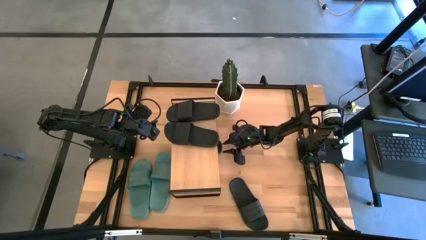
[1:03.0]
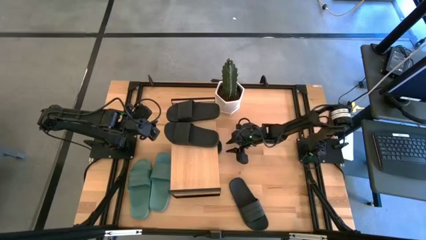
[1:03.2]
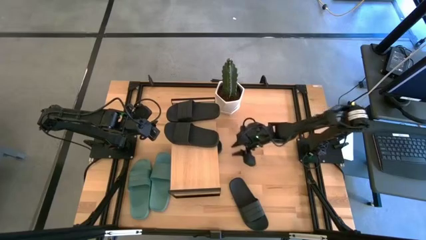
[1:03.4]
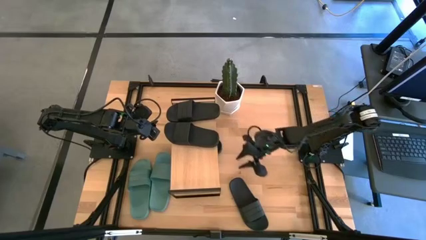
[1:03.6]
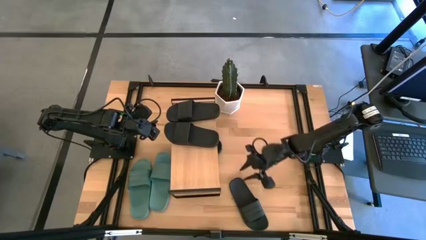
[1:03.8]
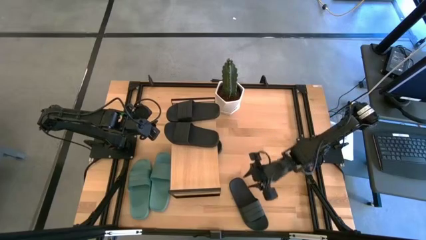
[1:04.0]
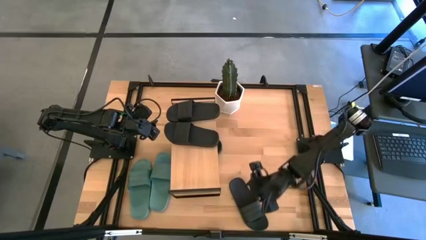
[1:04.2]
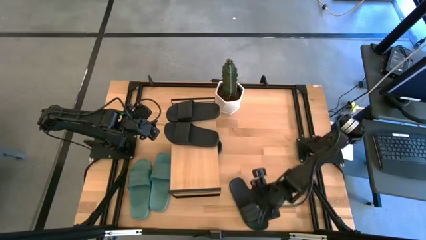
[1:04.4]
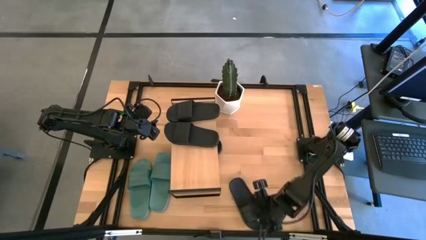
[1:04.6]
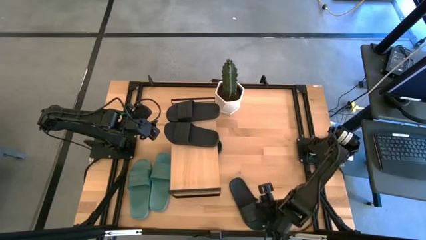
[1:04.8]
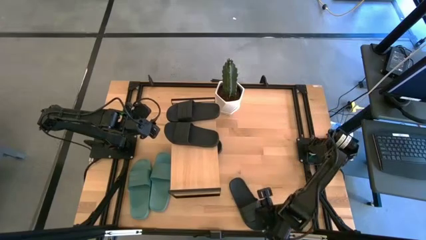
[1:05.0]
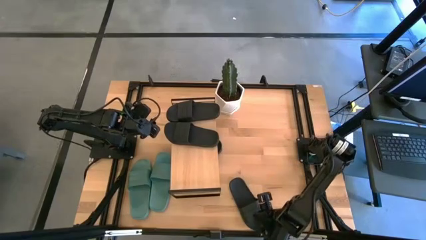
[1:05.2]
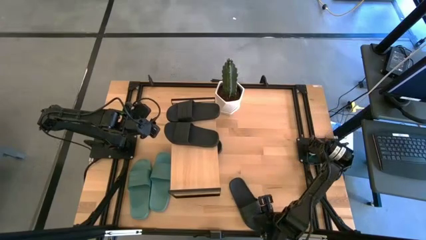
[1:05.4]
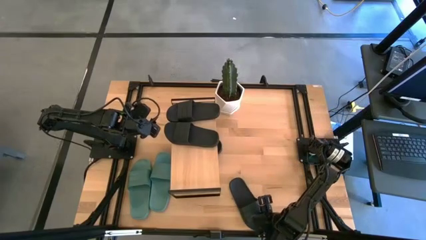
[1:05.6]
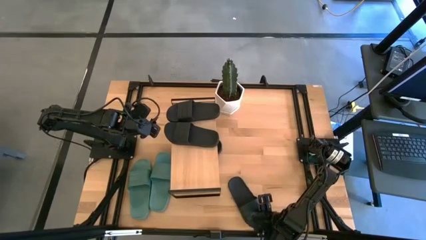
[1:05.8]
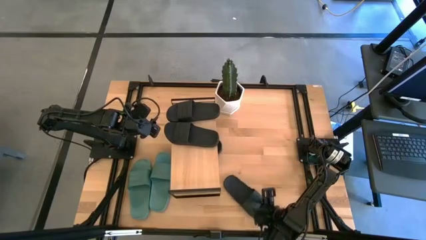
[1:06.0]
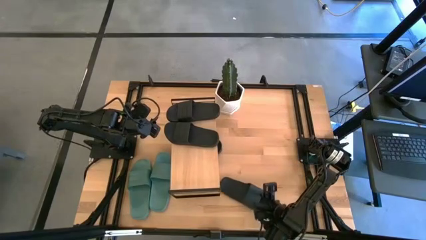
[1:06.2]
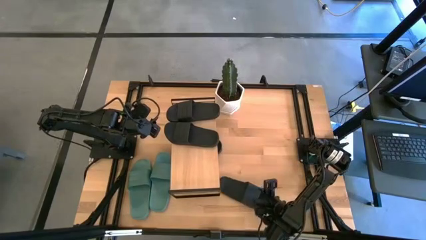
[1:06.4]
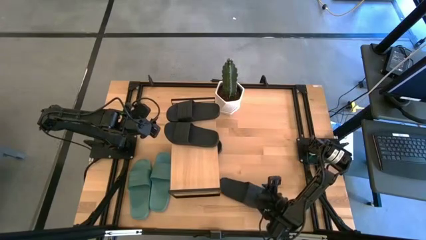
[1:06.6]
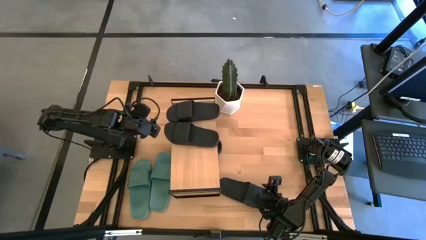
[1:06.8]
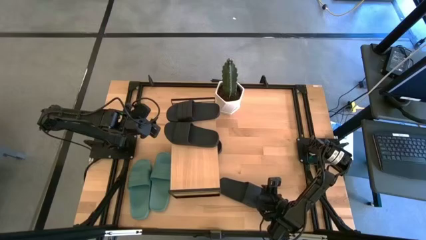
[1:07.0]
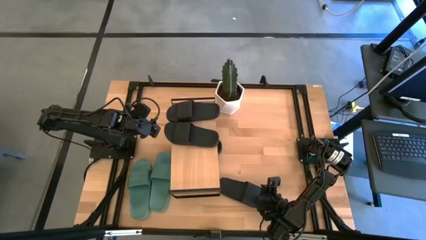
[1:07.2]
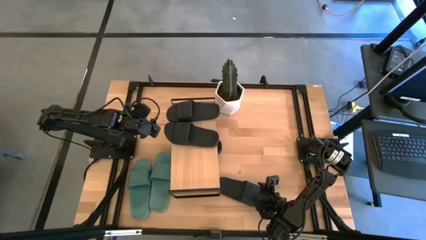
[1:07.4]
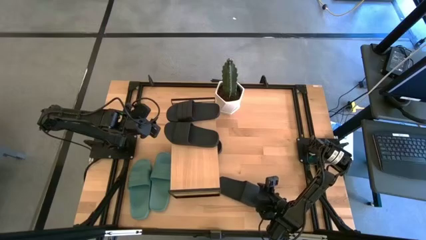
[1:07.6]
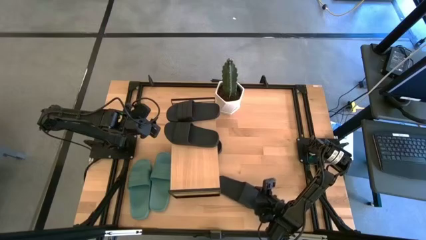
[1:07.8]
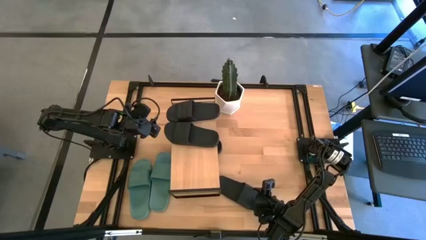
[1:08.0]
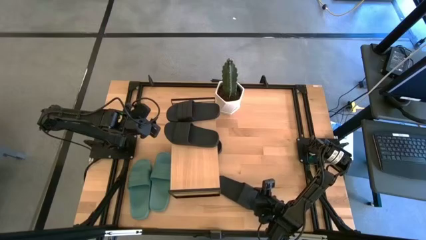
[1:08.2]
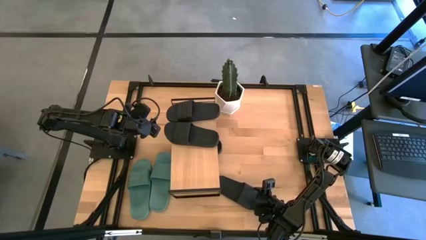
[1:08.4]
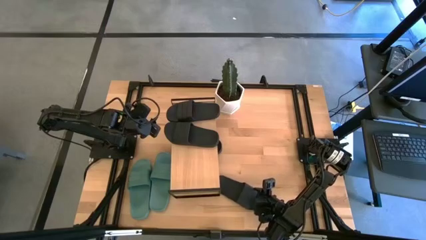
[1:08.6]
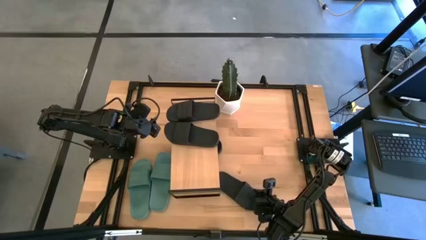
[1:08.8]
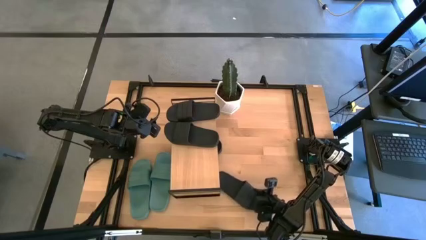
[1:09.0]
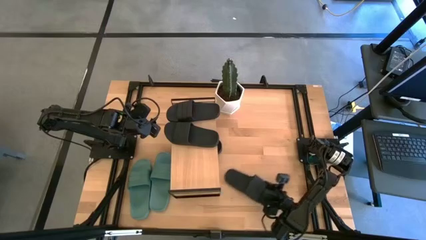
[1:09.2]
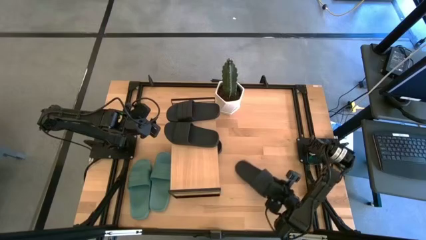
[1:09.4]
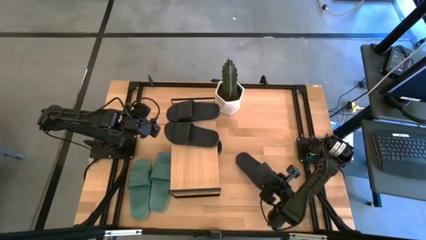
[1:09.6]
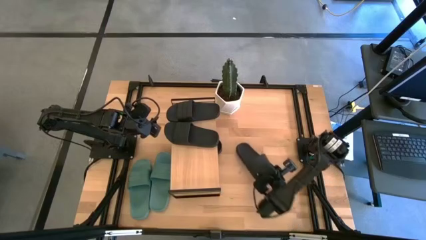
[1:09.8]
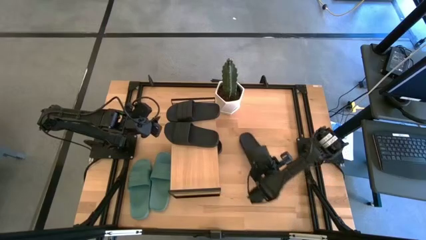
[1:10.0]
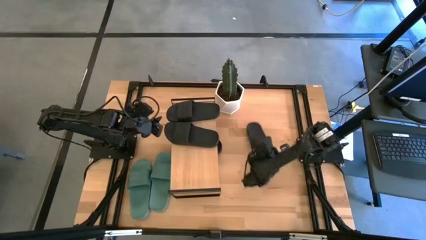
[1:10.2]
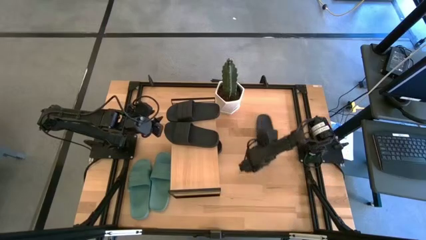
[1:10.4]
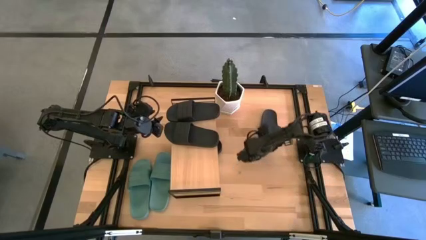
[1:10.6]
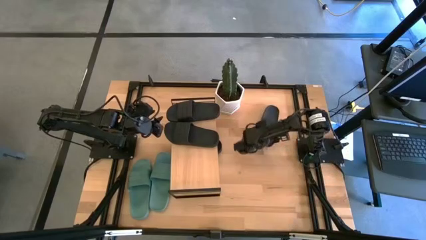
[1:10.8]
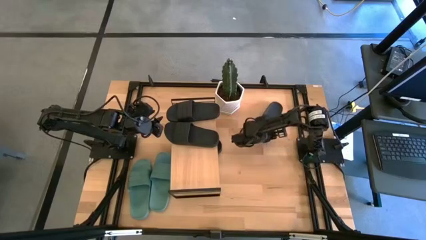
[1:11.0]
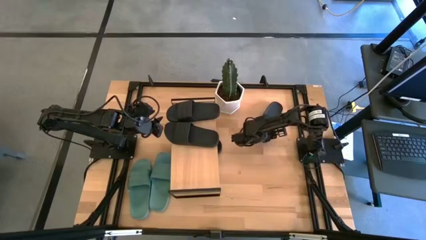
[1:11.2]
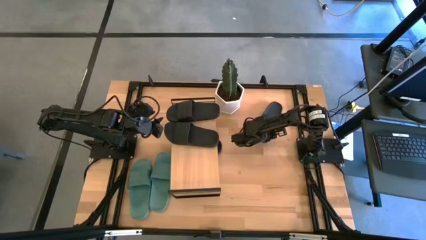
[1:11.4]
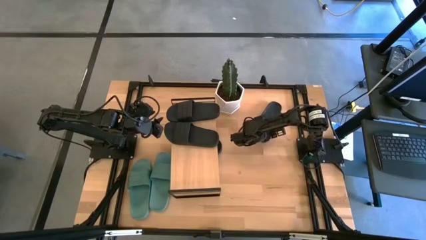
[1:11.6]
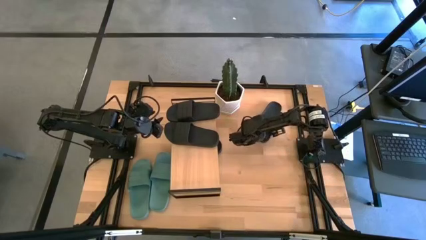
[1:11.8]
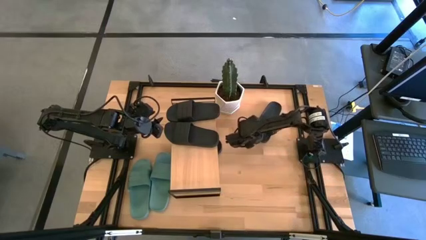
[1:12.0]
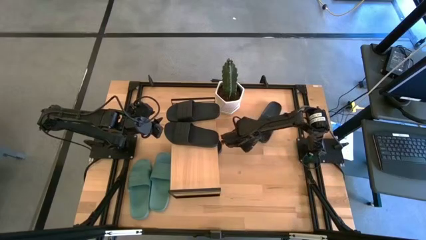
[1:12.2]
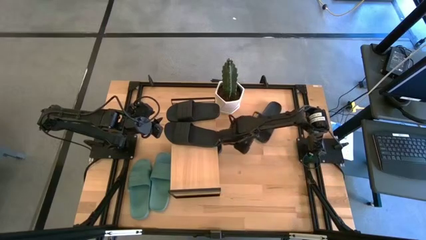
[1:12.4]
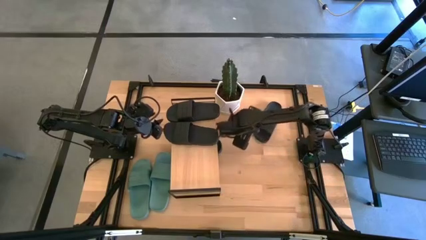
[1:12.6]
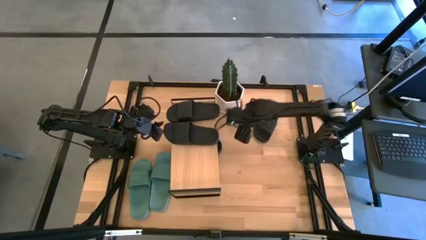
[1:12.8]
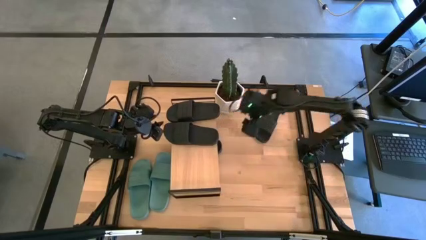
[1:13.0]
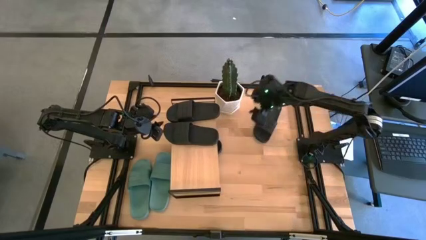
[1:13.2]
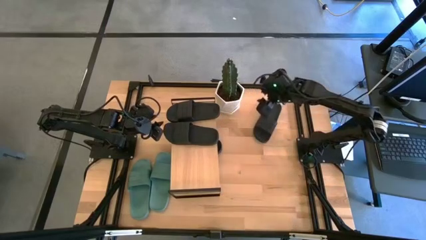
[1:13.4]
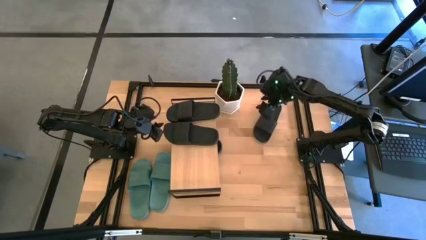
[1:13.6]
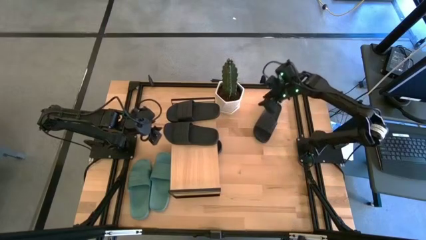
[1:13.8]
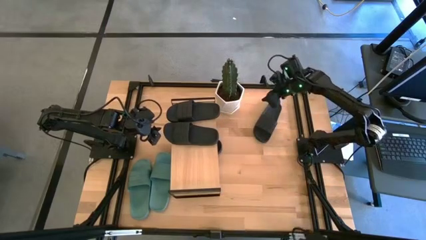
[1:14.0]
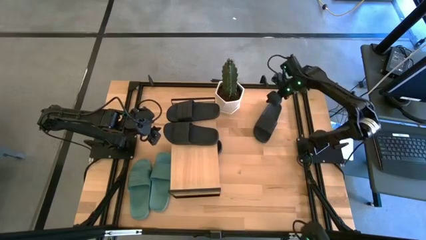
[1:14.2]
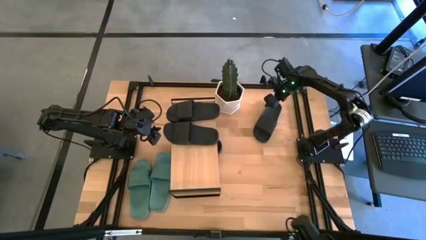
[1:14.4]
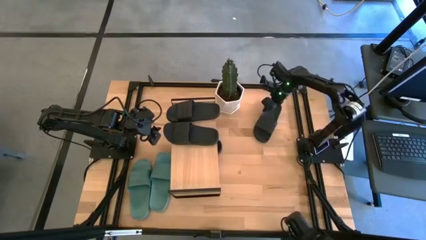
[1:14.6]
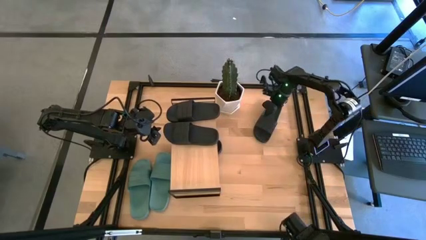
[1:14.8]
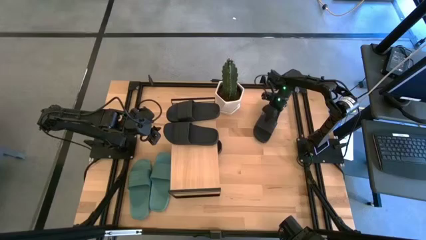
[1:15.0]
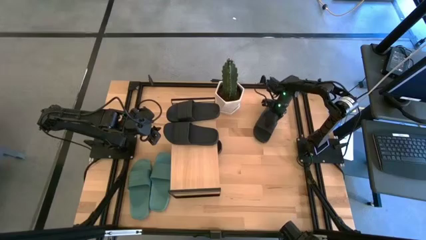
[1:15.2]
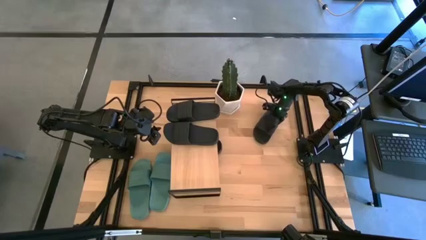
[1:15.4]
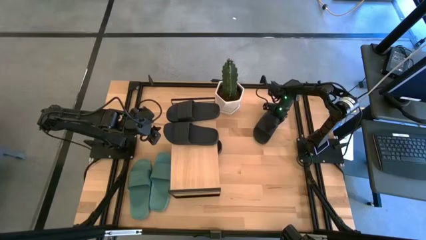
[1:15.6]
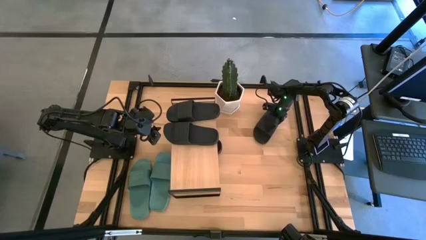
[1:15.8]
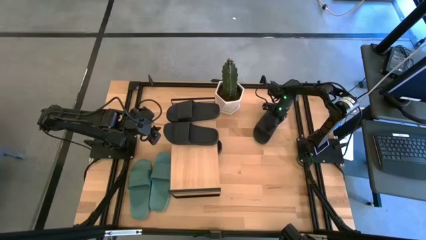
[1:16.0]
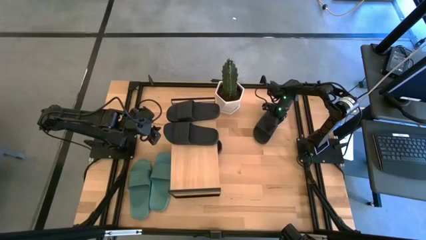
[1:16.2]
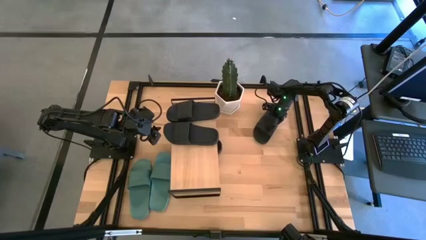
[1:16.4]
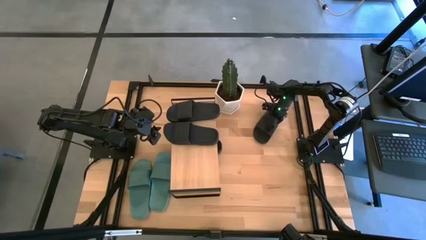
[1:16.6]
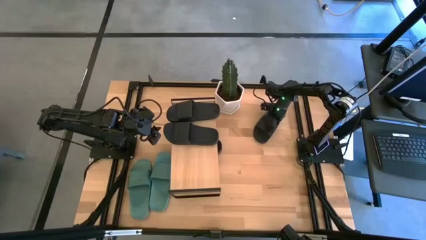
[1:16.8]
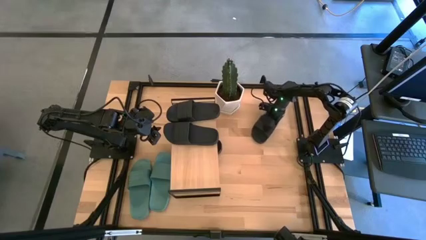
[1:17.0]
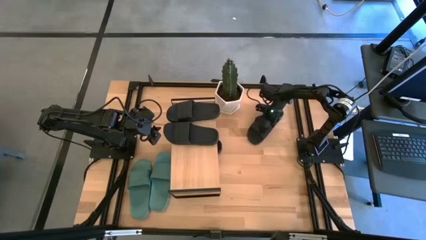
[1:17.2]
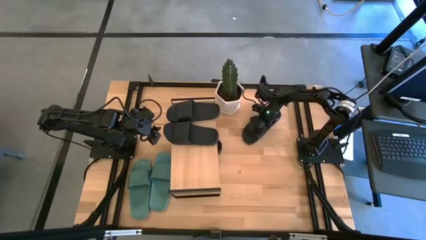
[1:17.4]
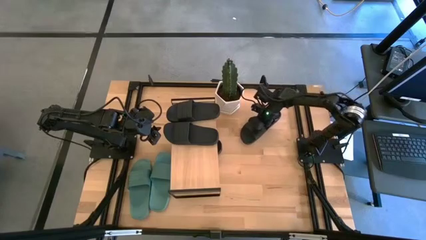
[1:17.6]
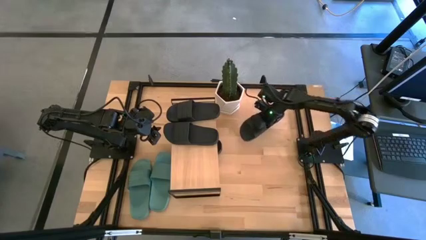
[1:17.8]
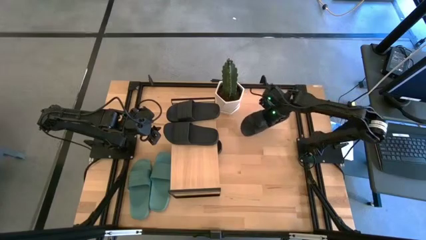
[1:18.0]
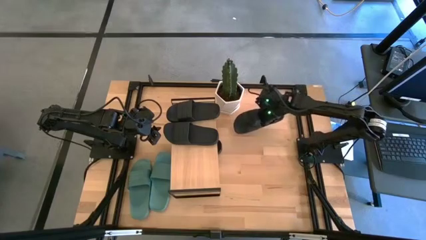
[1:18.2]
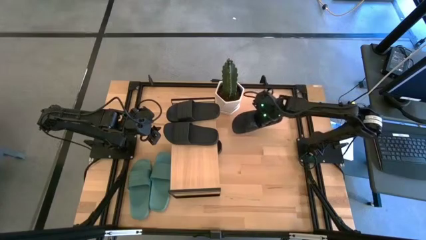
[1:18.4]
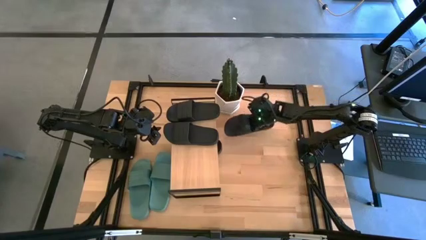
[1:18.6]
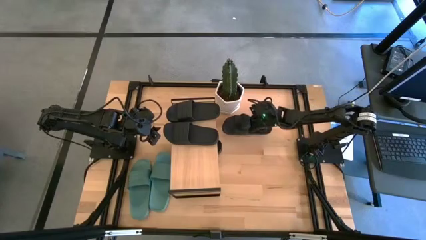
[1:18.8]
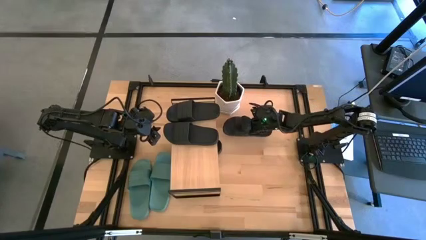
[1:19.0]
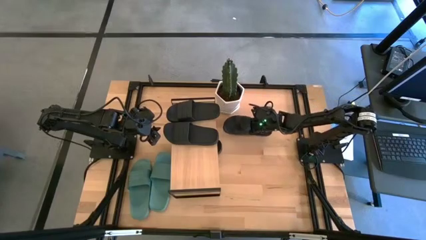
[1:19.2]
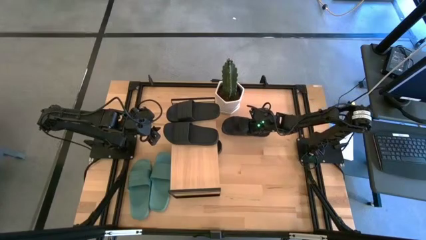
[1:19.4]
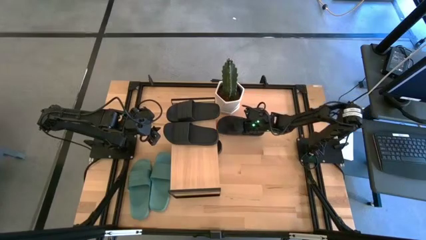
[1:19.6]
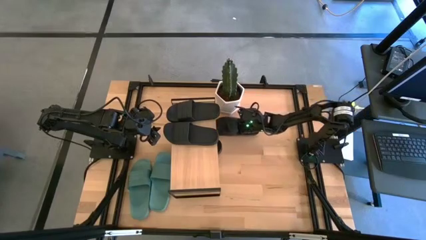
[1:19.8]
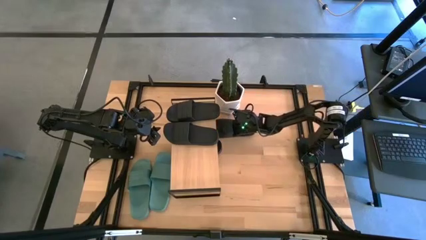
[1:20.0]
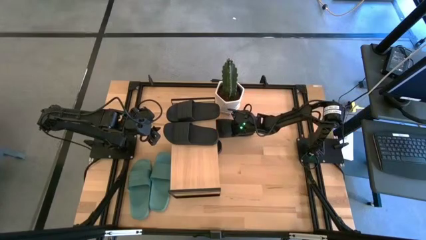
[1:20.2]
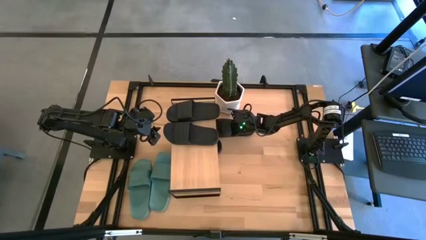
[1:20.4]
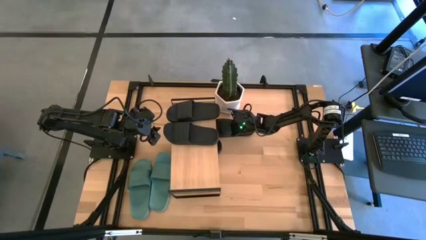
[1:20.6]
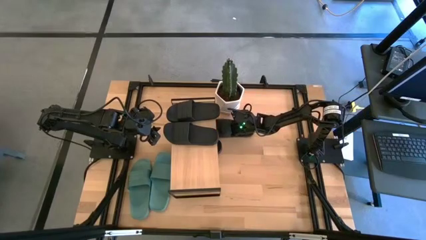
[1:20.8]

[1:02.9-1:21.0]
Task: Pick and place slides into the shelf
Put the black slides under the shelf
